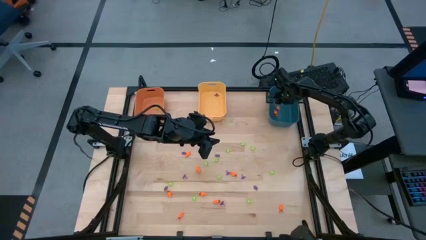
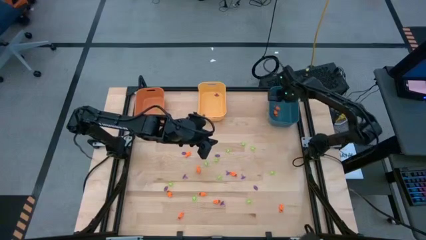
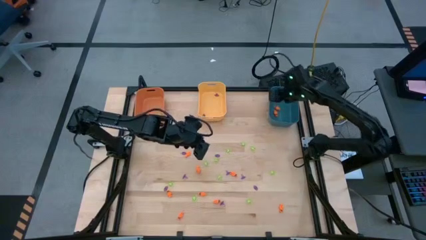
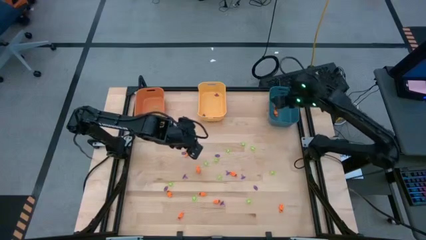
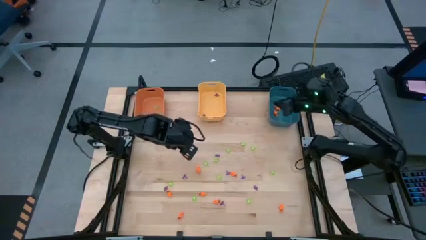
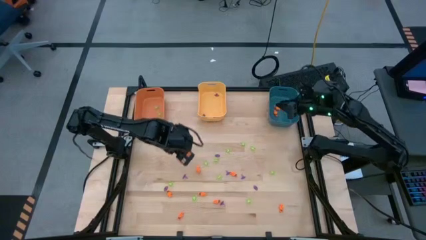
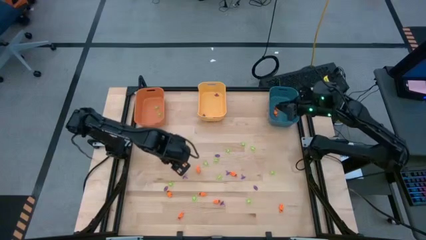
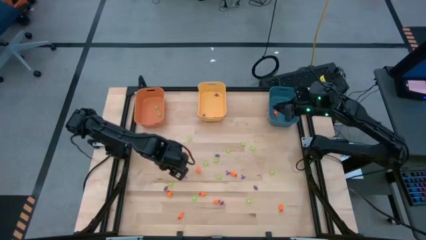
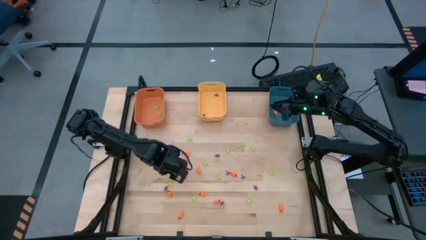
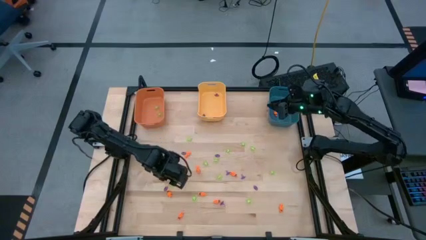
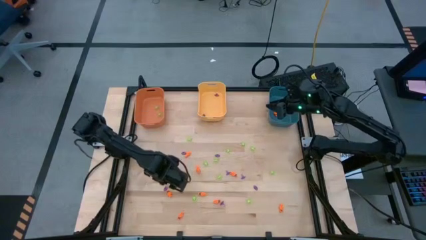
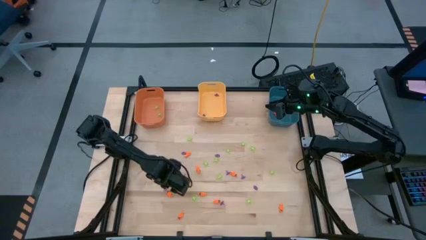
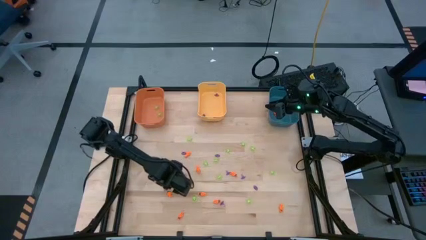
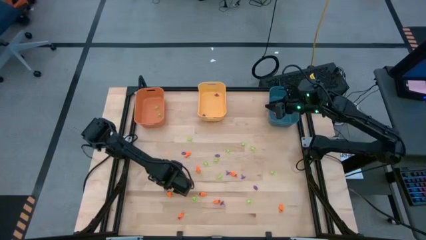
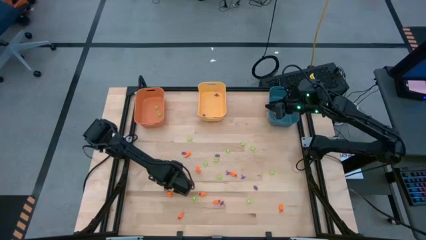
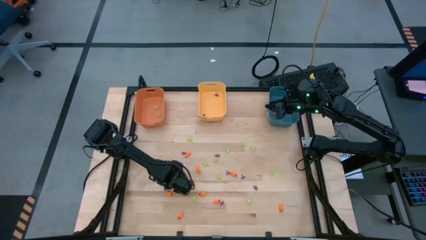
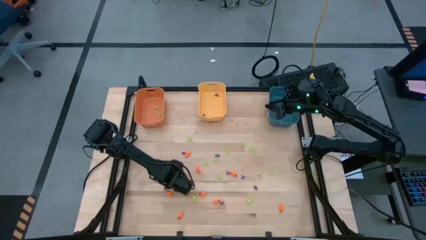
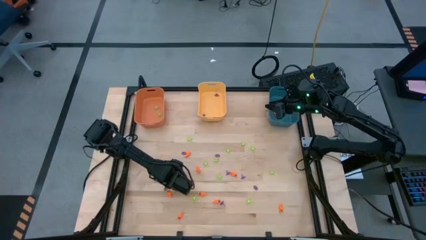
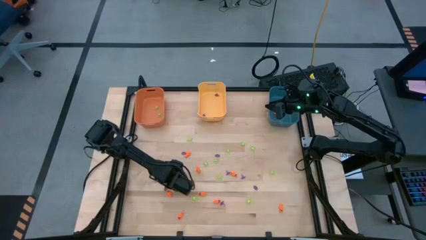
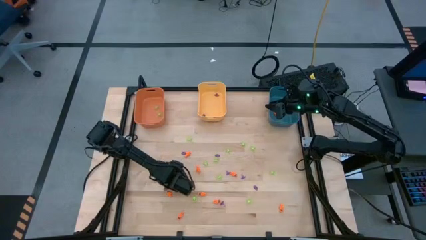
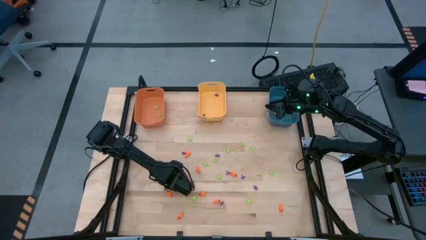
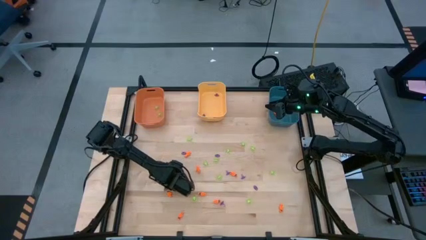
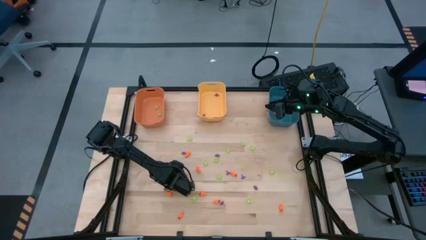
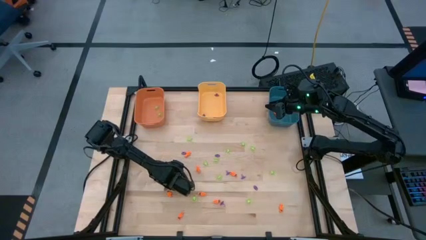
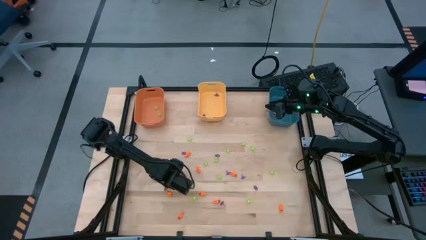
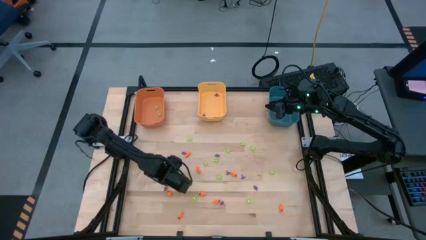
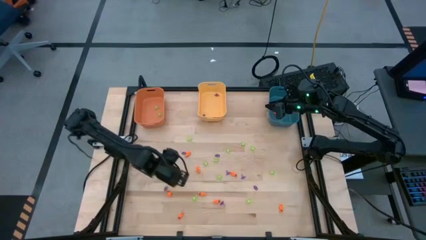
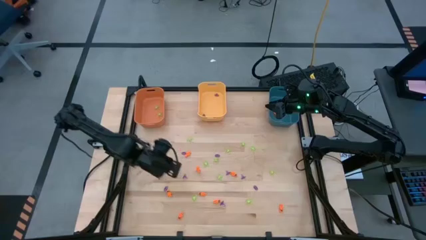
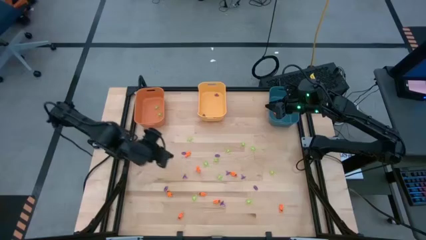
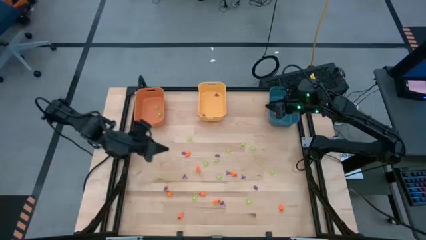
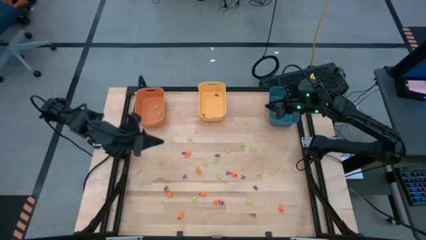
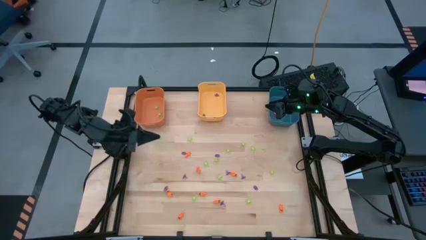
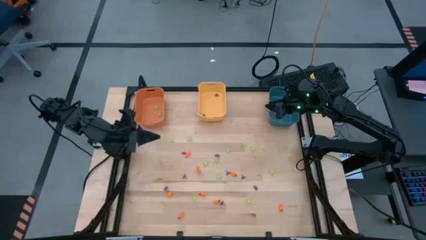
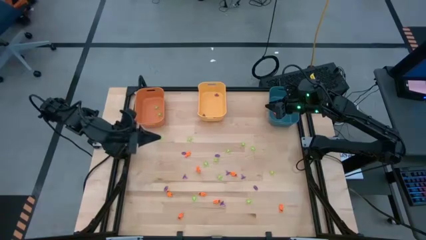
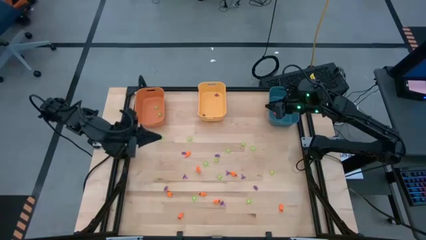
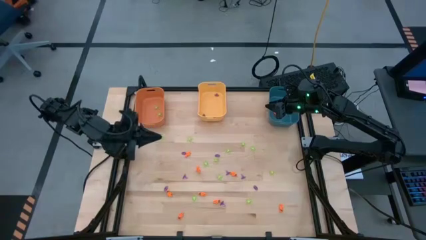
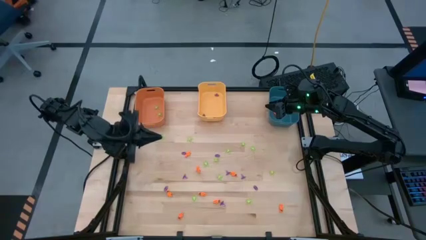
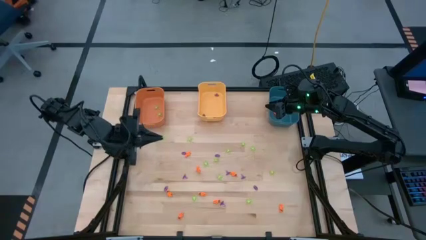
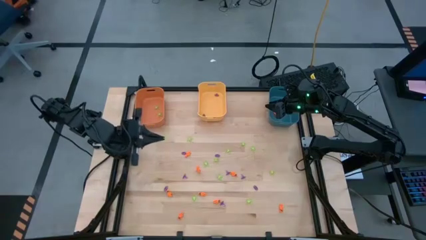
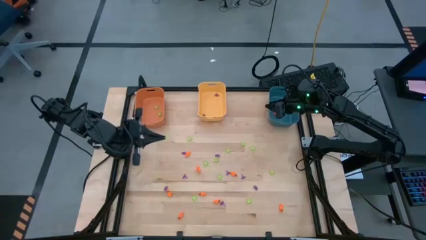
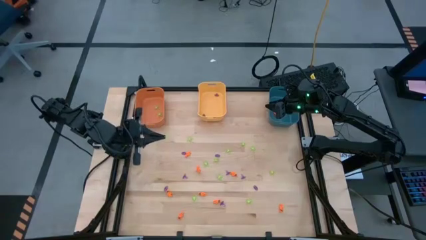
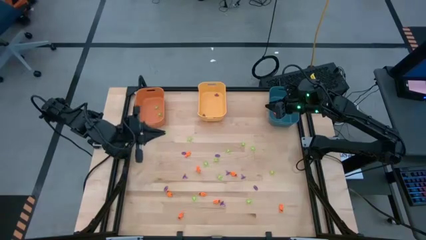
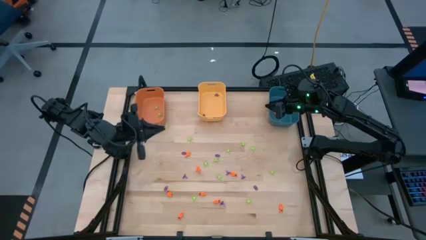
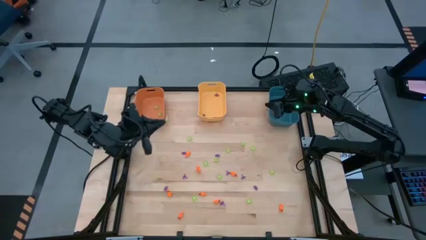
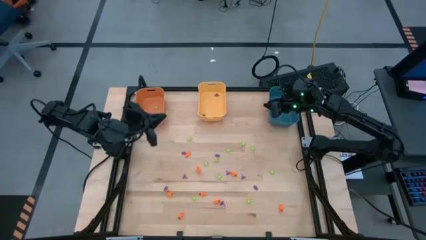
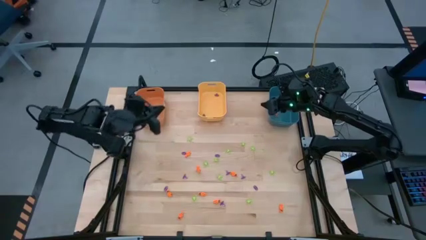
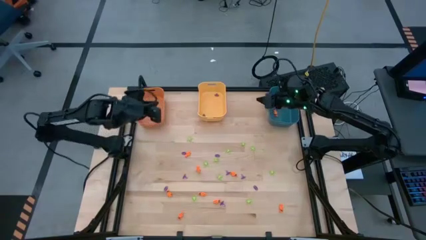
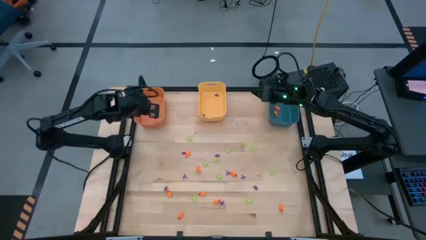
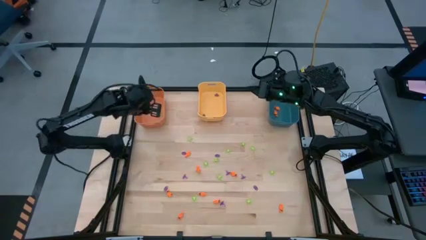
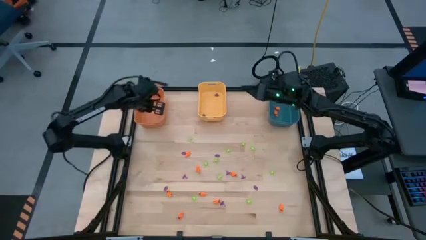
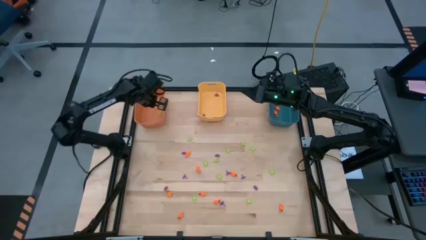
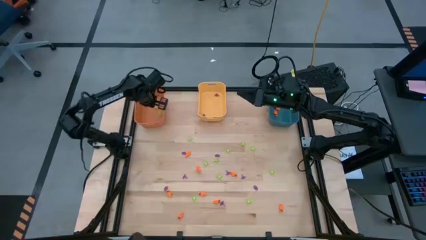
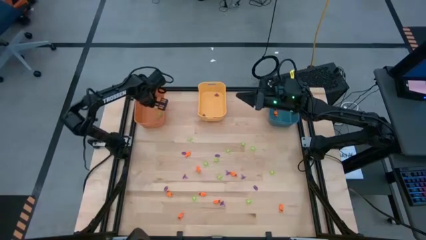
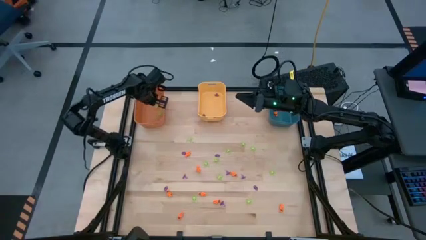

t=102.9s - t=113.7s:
Task: Sort Halloween decoration
Put the green spider toy into the orange bin

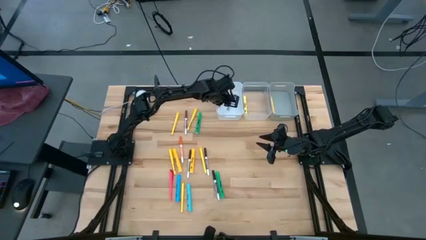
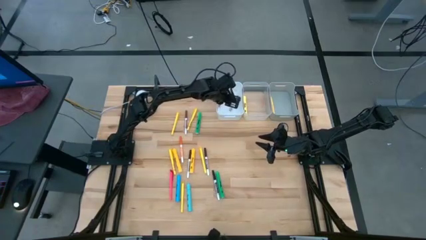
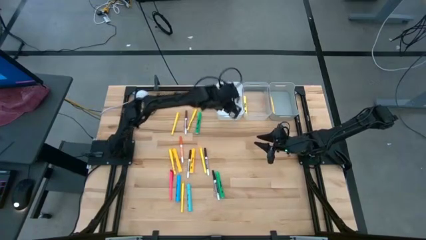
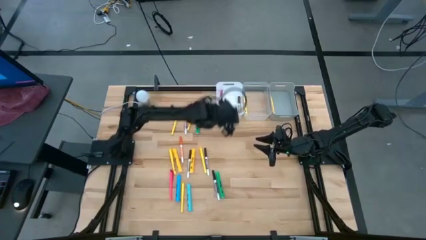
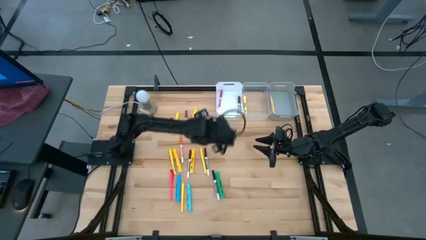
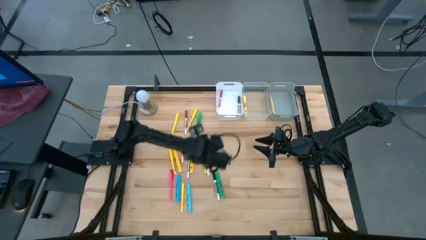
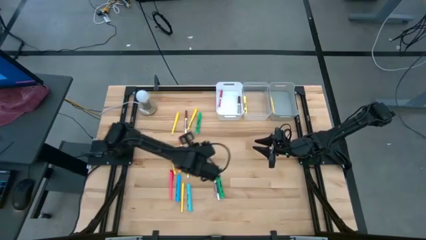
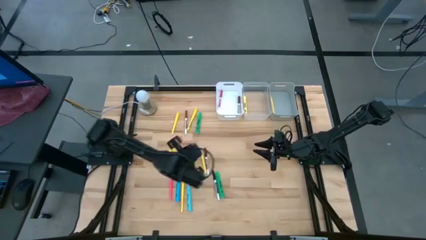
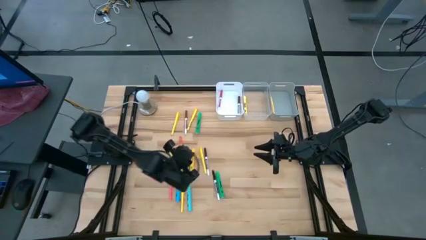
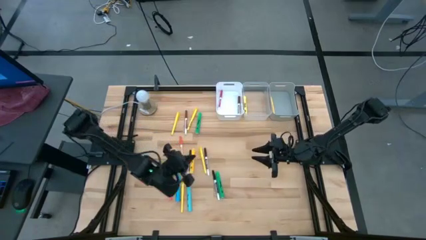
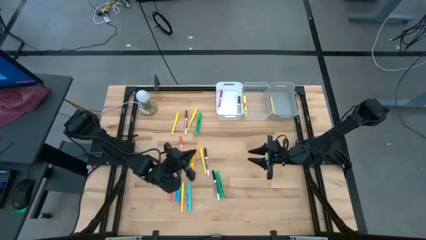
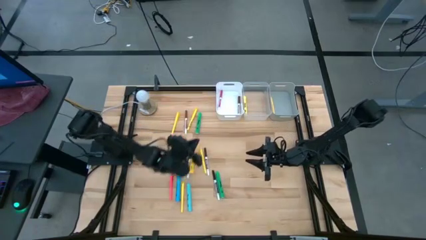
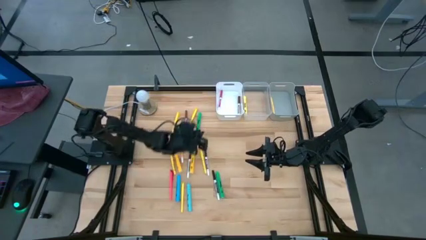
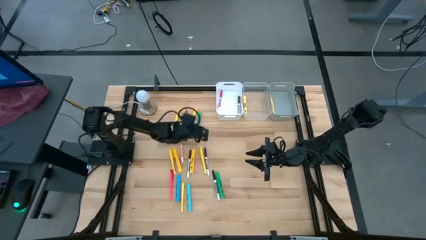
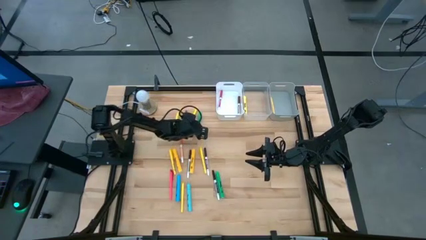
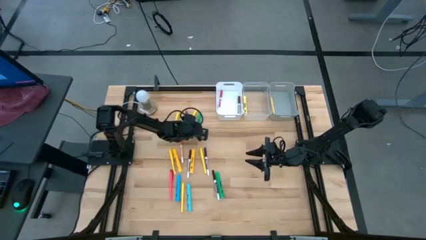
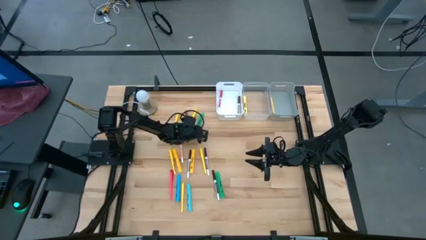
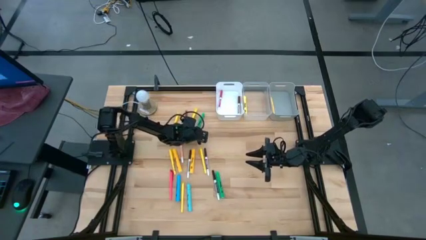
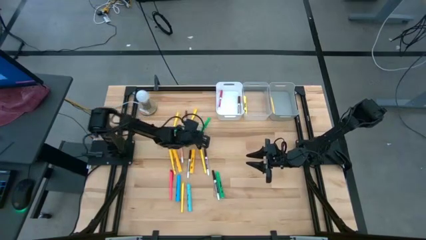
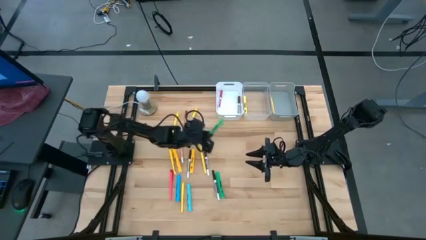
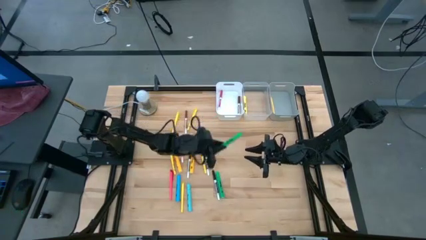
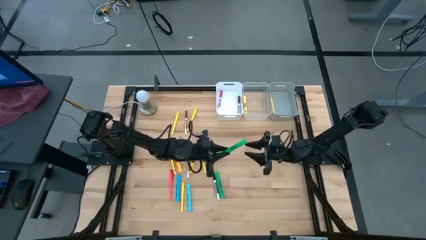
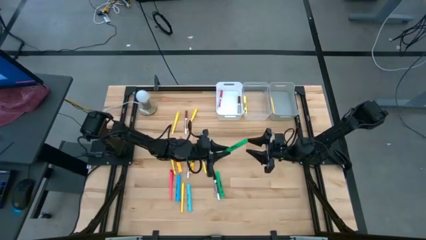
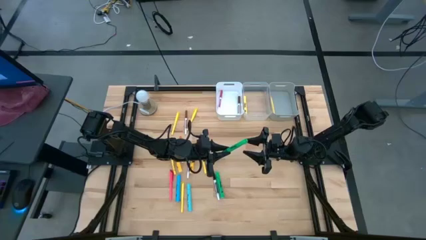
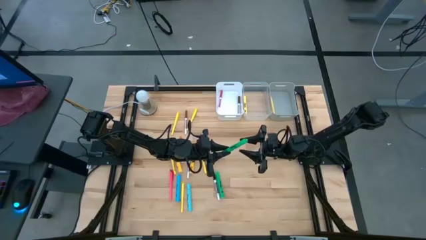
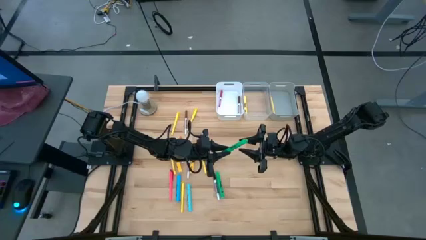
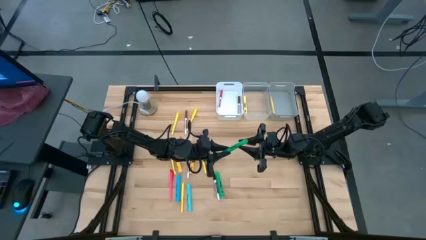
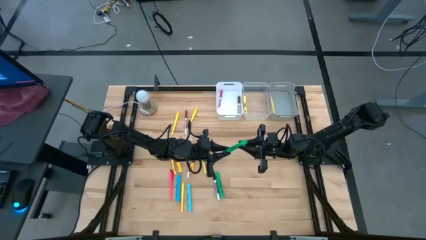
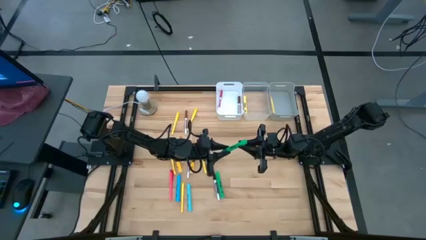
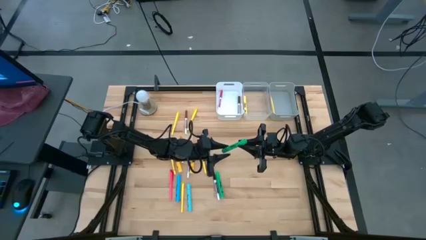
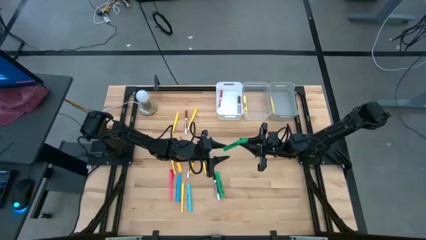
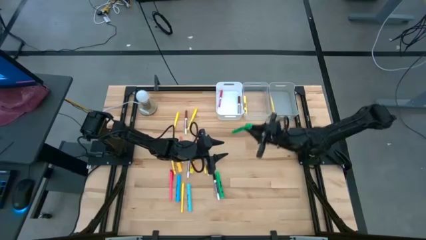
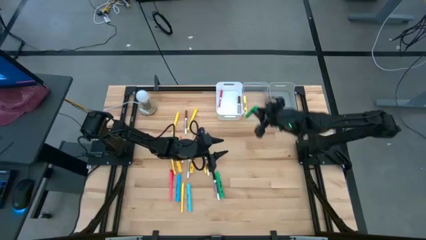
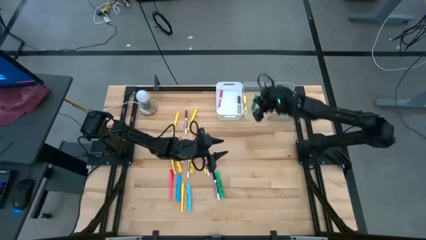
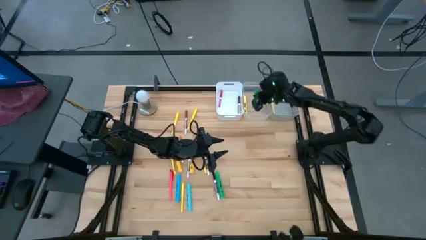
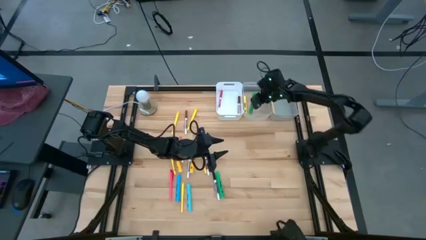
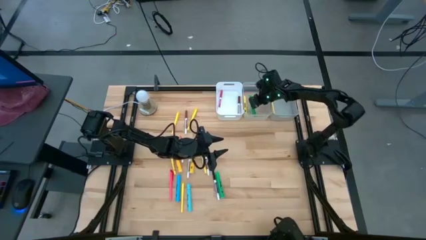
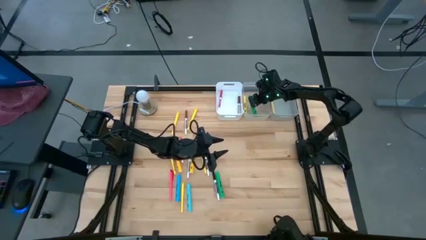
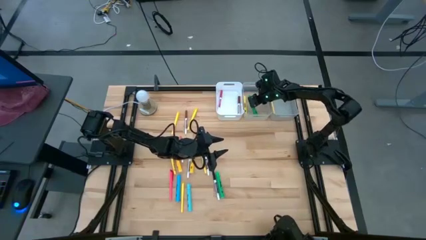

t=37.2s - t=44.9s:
Task: Pick & Place Markers
Put the top green highlighter pen into the transparent bin
